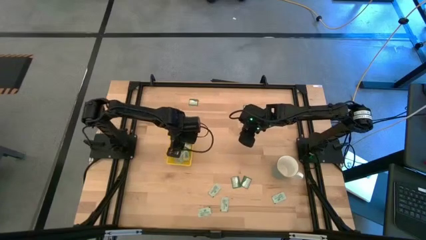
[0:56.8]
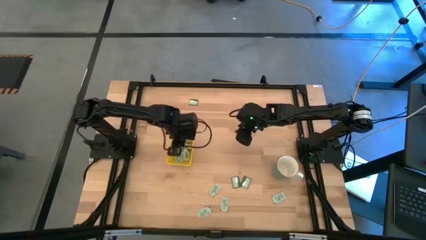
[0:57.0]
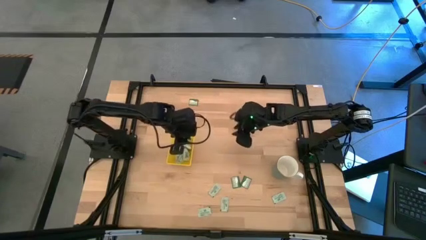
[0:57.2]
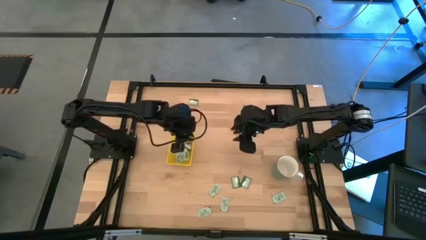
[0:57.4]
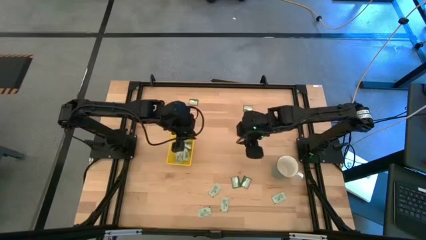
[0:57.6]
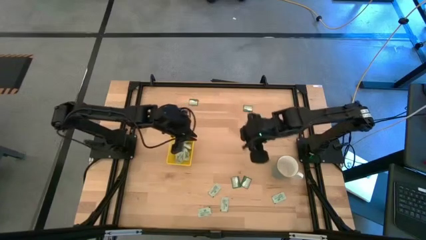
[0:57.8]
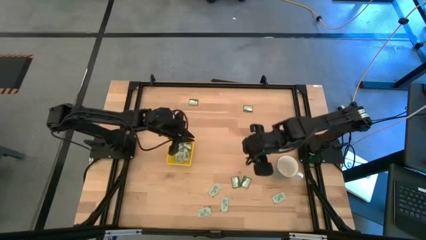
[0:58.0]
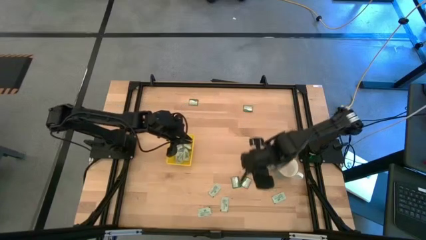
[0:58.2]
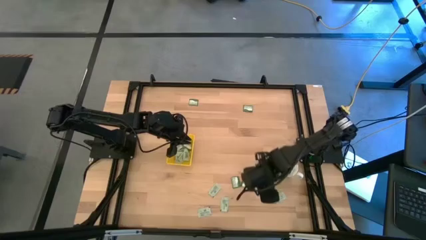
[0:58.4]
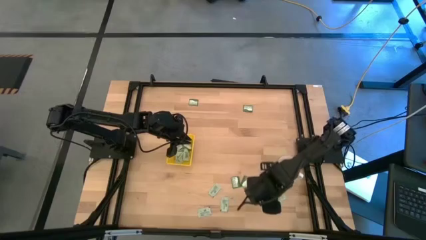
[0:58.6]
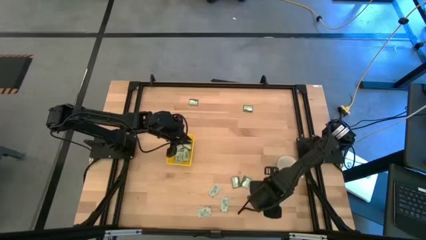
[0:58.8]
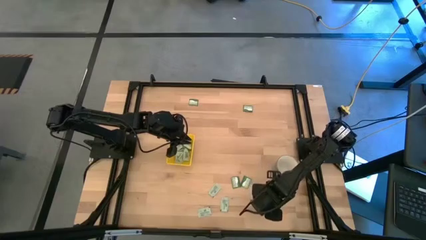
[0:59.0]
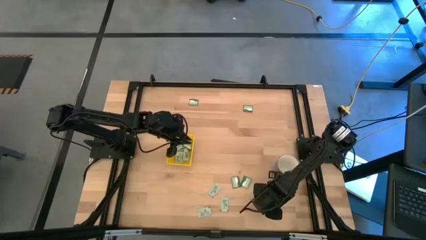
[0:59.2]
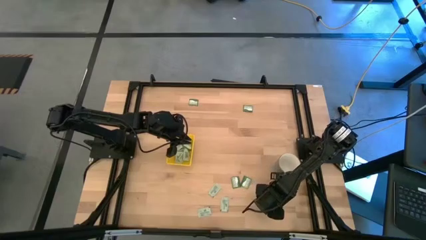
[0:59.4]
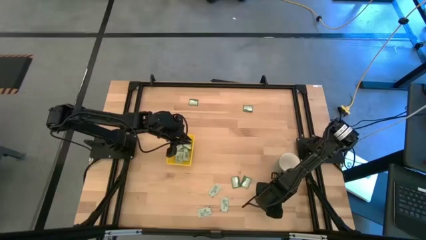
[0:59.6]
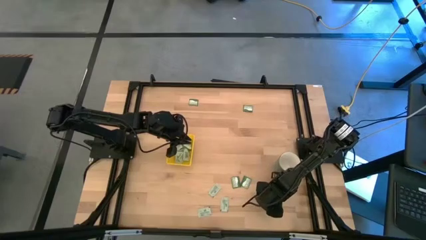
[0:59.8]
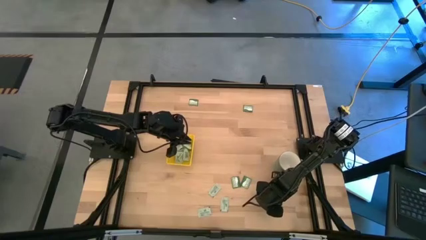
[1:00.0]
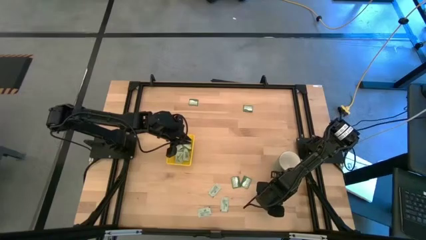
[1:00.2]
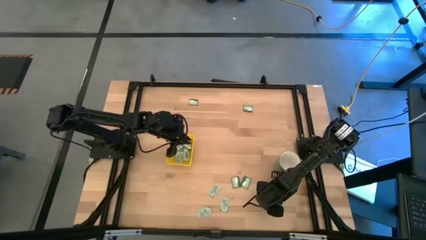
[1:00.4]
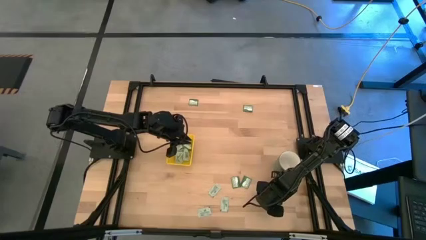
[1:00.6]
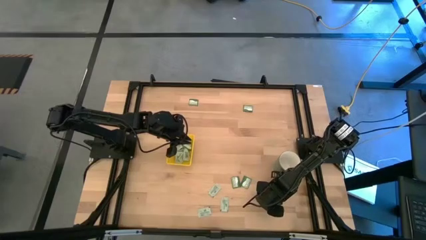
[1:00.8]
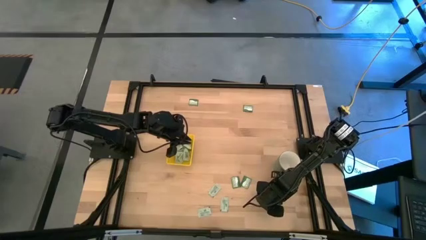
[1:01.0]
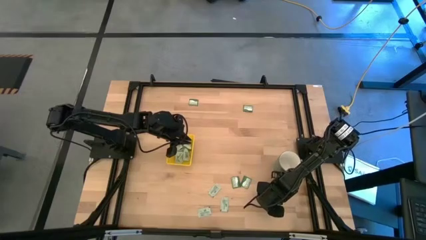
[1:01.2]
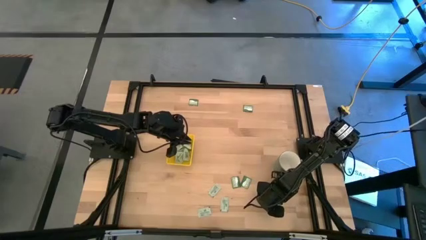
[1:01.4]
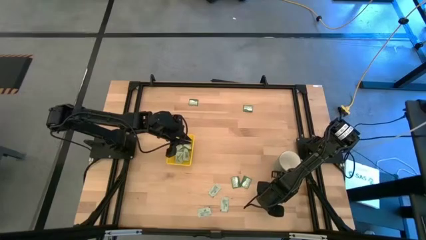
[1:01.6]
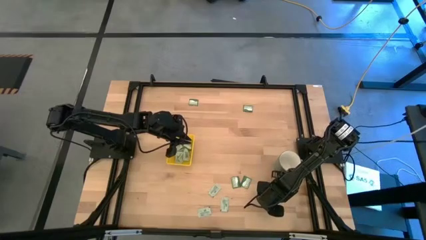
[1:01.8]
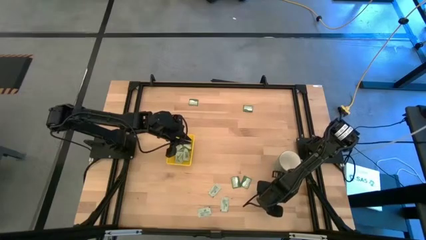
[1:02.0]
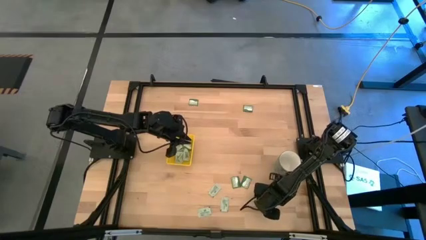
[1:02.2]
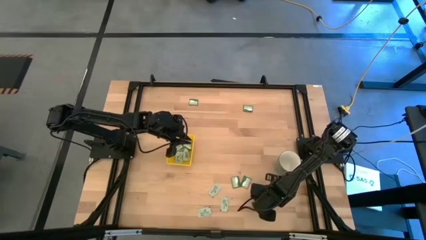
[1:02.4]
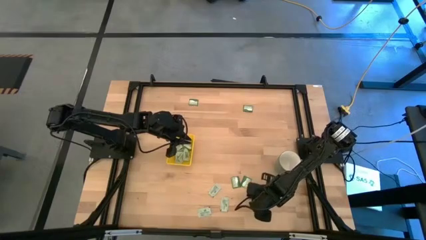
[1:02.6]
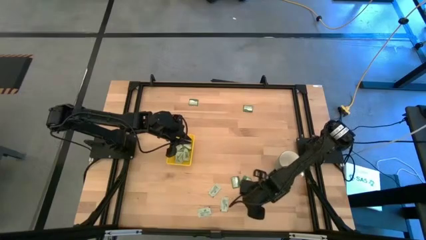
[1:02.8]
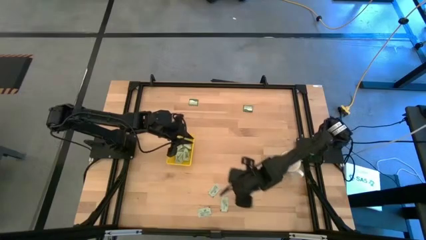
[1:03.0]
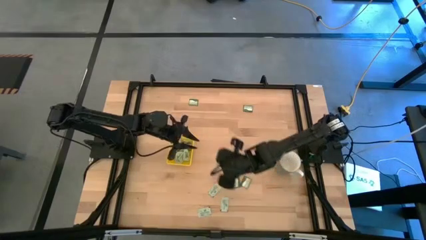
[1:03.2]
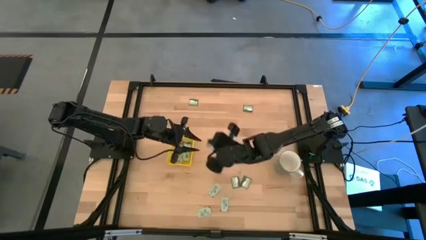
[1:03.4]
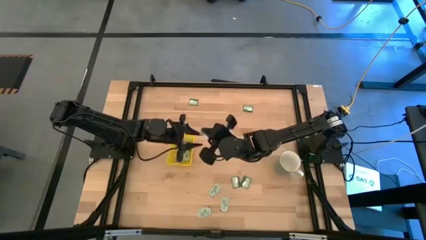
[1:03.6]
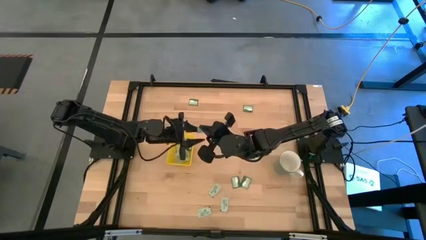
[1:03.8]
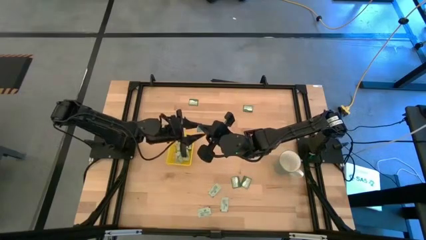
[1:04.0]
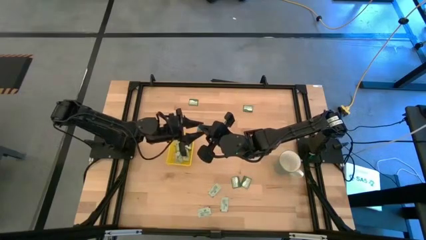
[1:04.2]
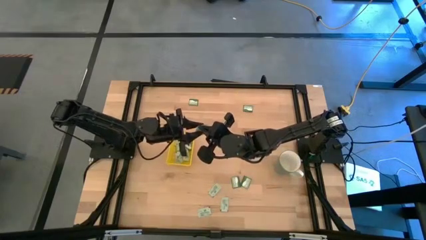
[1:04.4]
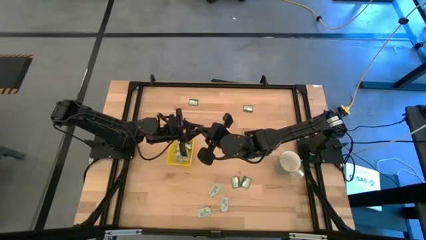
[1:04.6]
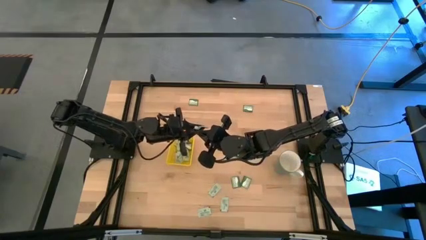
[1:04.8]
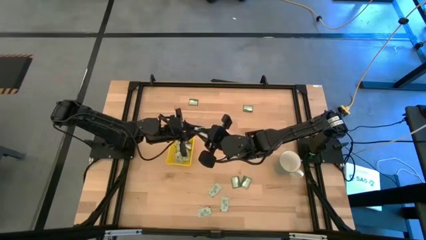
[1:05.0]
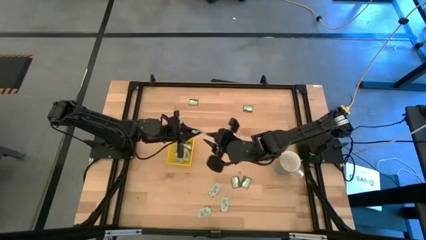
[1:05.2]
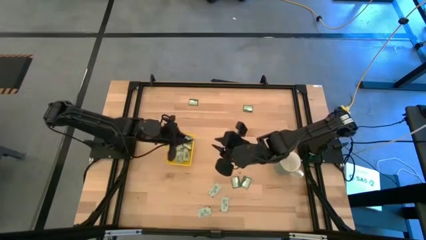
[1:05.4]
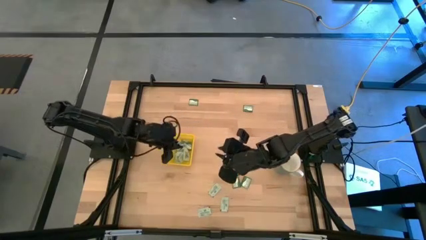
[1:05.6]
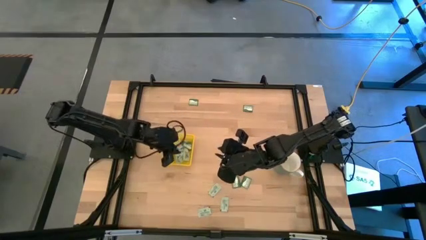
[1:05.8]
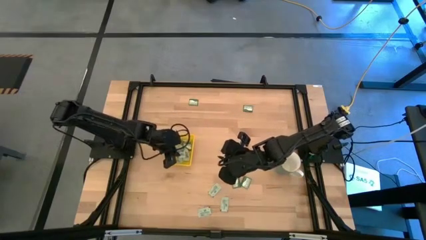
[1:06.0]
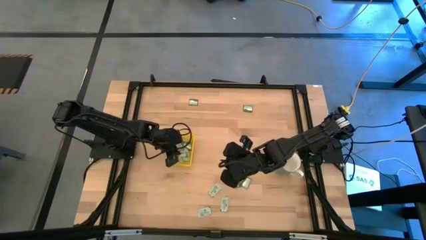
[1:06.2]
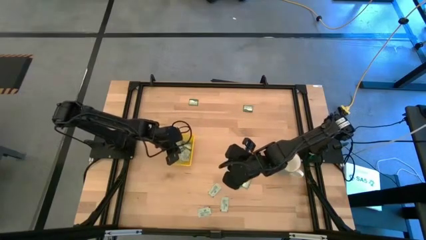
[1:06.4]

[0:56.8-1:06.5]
Task: Pick and place Stevia / Truvia into bins
Put the white packet into the yellow bin

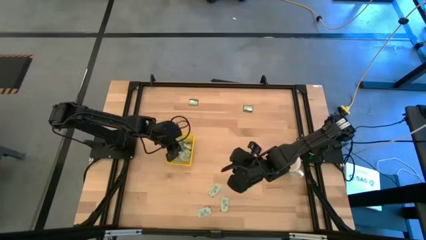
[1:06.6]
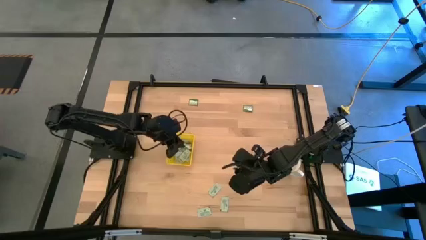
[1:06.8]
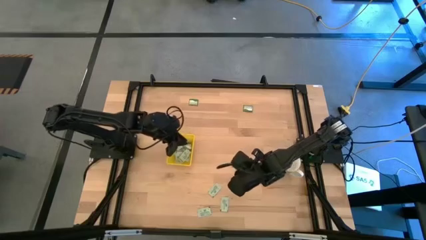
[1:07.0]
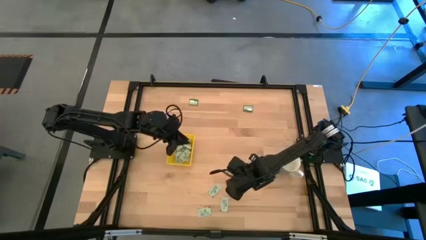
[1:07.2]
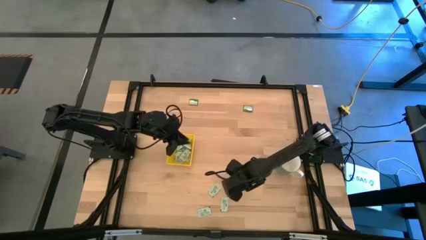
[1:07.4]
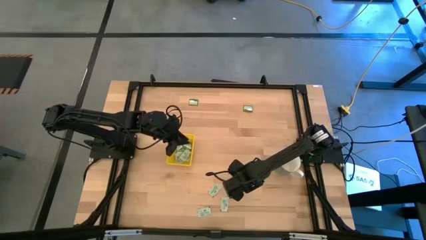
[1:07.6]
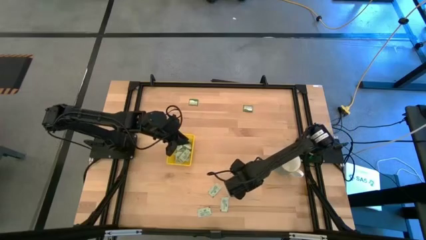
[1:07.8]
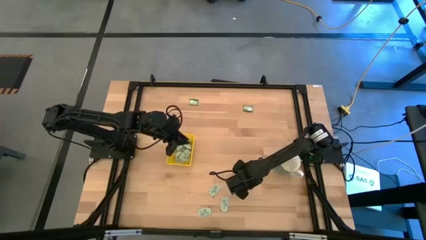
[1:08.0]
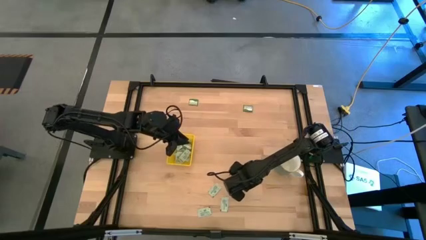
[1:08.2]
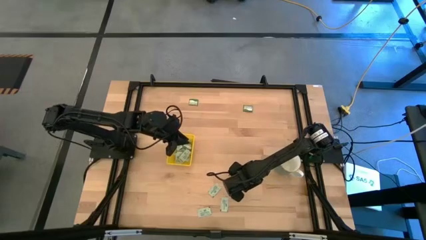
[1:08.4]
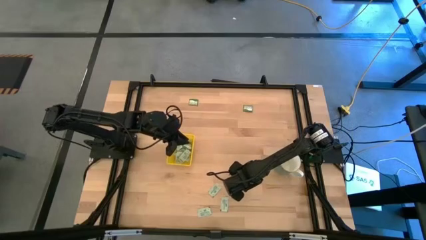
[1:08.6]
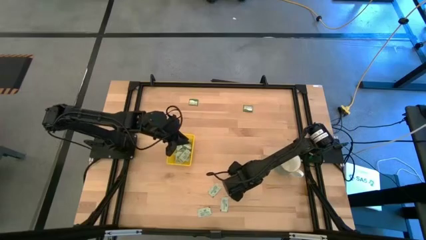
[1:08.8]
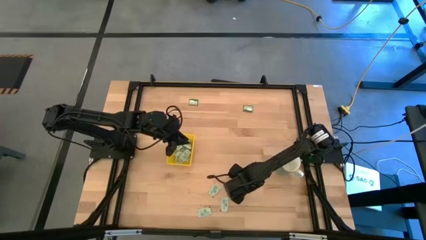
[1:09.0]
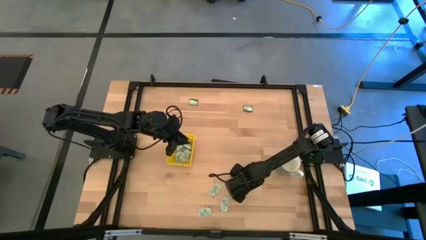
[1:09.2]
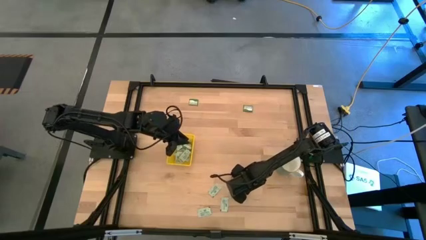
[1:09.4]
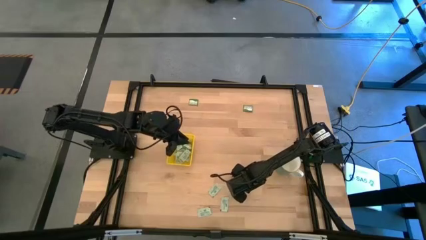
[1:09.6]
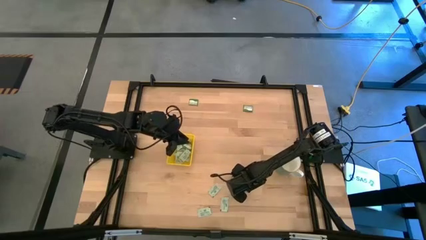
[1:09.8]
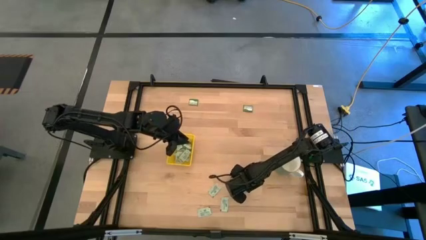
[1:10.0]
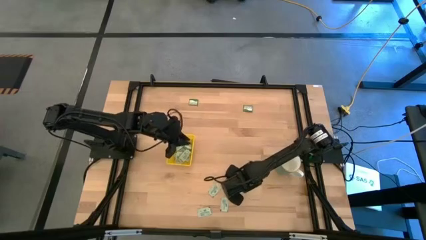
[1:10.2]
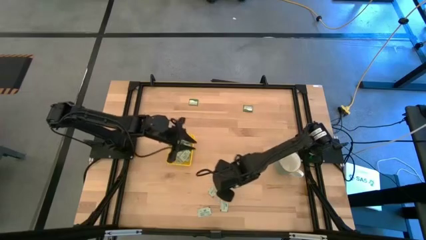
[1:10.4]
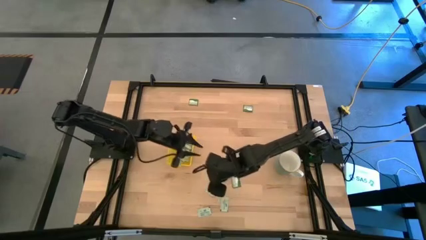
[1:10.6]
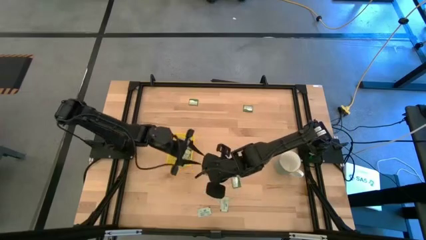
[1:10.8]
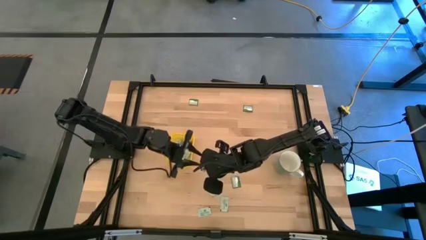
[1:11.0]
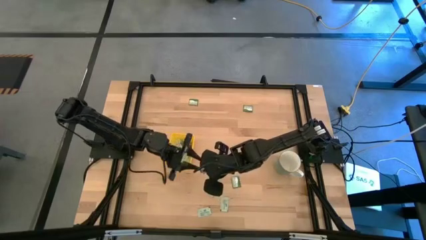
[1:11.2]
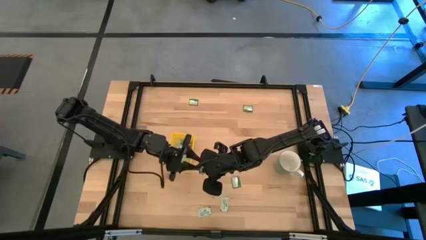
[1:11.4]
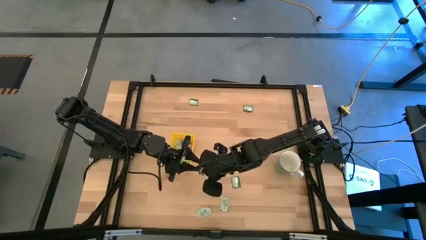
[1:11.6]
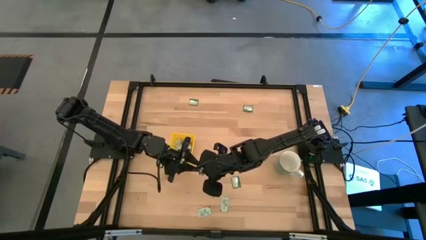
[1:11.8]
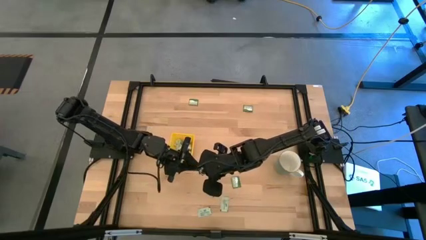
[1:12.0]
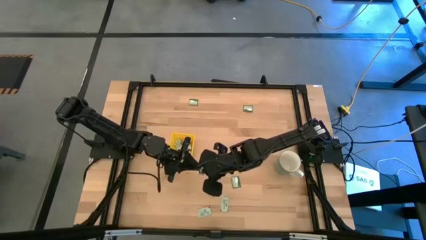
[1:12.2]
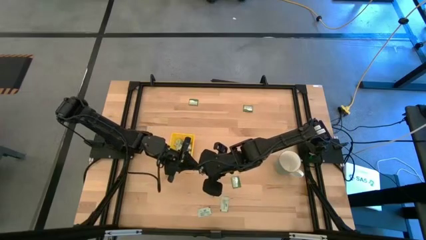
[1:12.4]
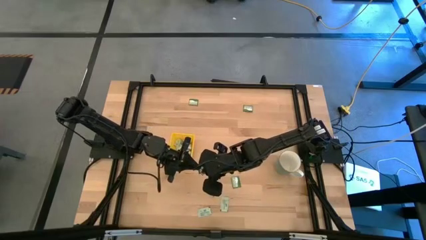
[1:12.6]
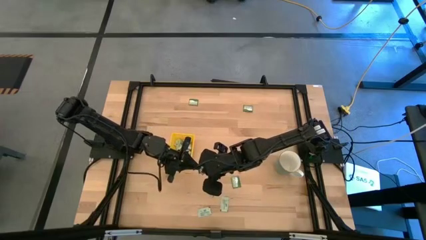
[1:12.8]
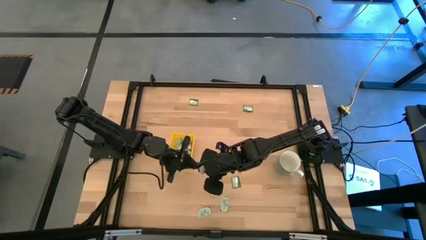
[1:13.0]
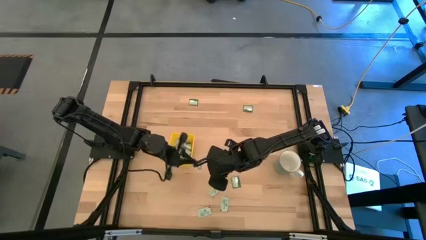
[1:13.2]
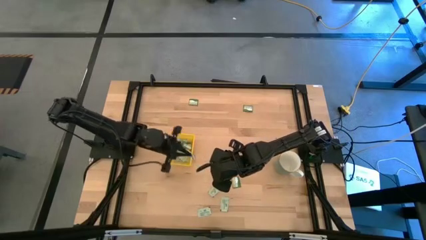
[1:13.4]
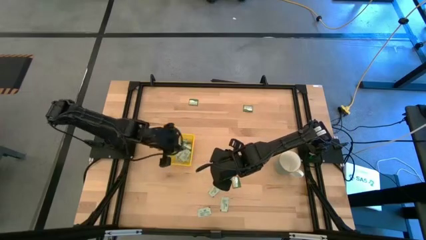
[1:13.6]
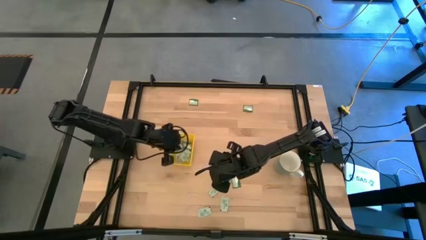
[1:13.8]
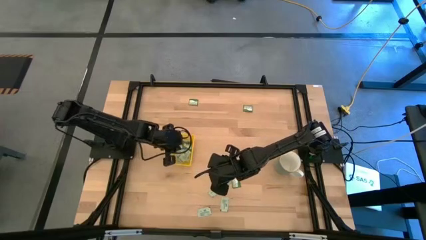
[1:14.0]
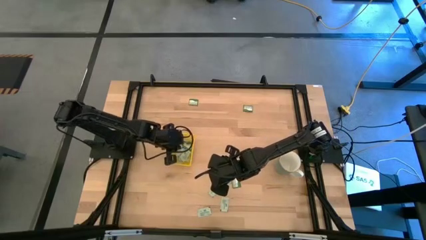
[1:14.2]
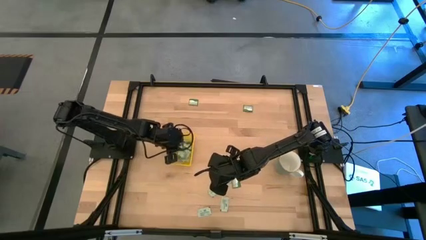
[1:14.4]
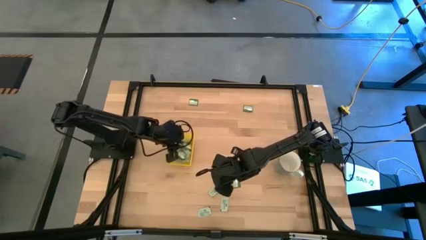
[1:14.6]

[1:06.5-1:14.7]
Put the green packet into the yellow bin
